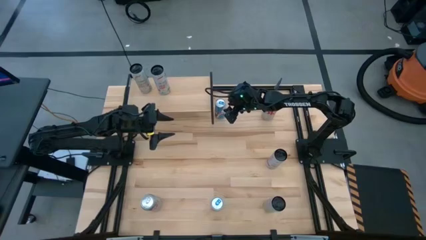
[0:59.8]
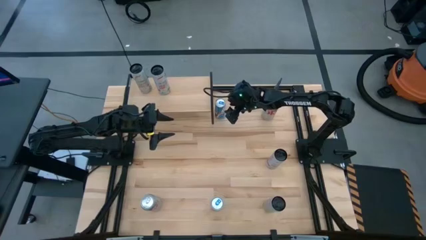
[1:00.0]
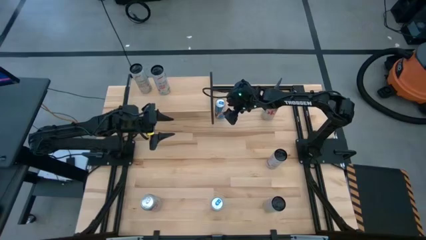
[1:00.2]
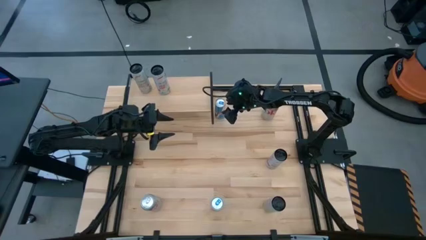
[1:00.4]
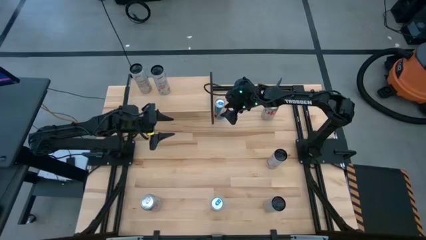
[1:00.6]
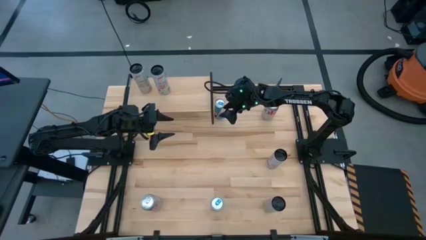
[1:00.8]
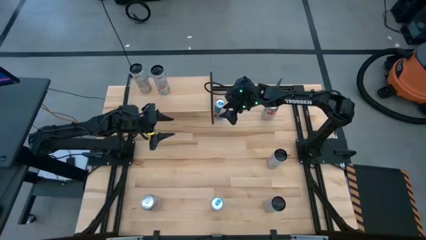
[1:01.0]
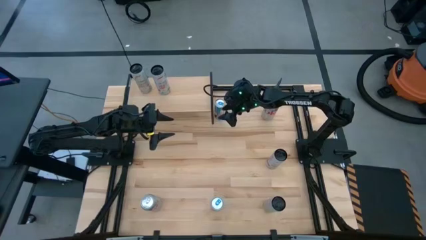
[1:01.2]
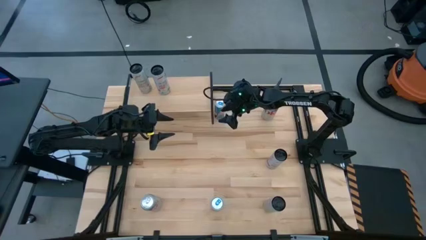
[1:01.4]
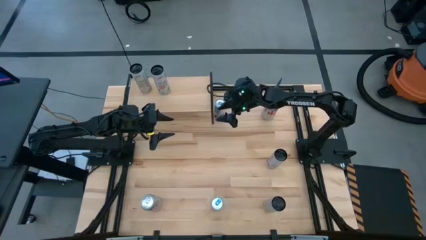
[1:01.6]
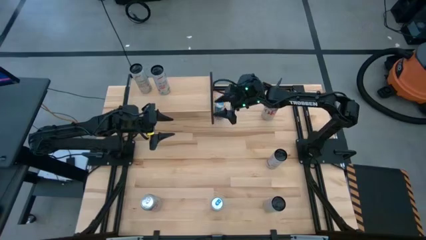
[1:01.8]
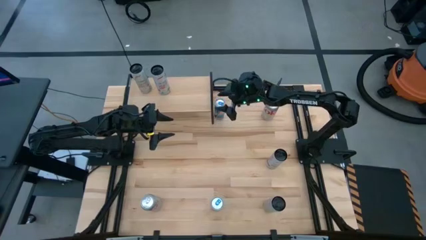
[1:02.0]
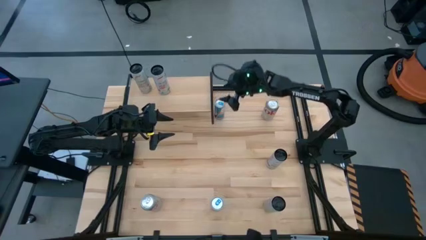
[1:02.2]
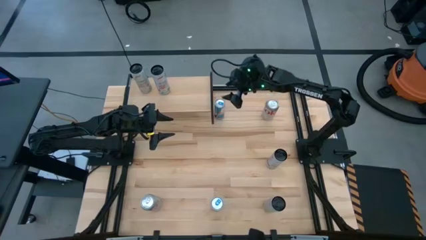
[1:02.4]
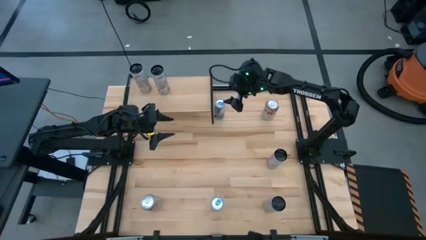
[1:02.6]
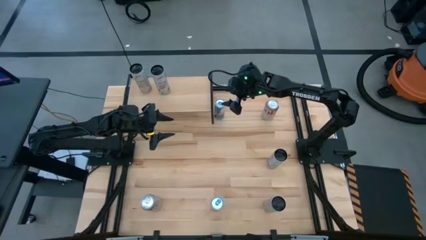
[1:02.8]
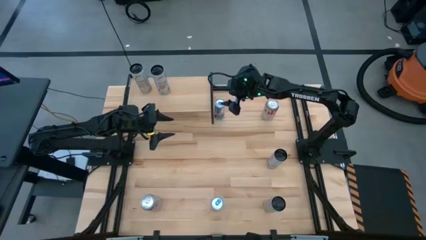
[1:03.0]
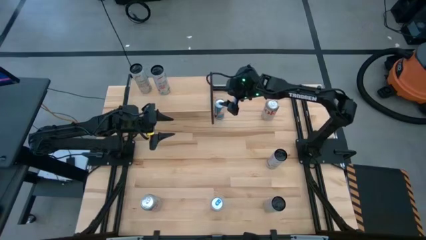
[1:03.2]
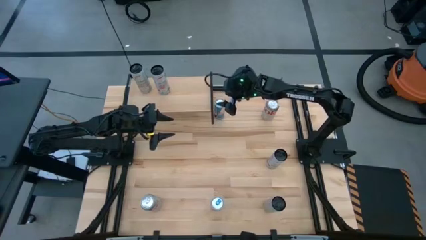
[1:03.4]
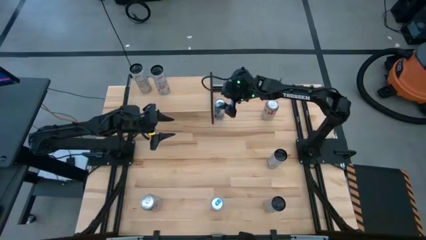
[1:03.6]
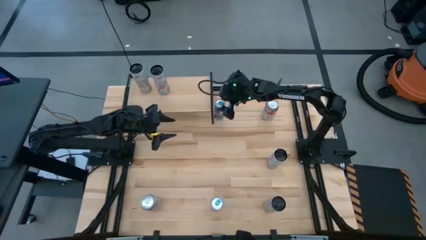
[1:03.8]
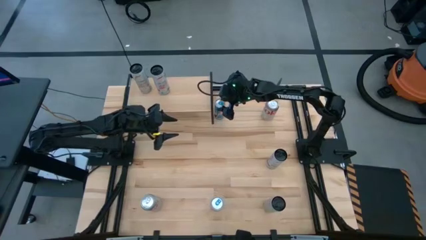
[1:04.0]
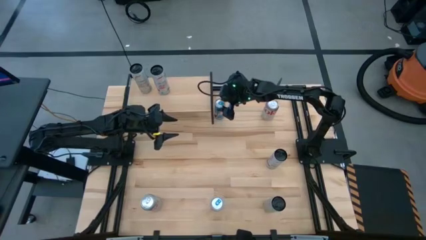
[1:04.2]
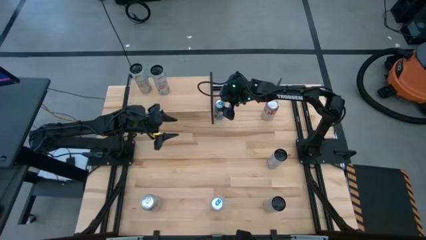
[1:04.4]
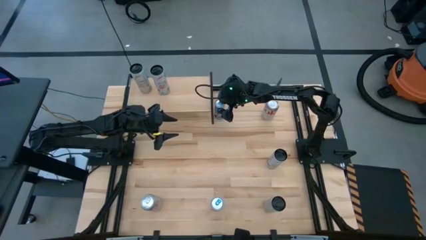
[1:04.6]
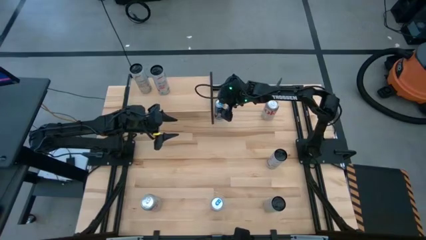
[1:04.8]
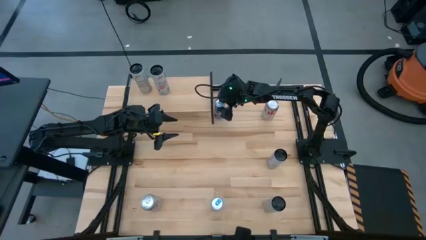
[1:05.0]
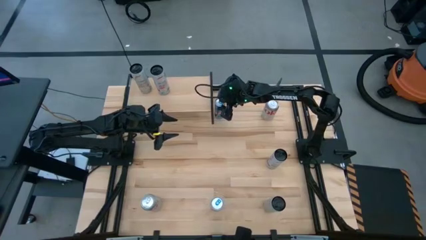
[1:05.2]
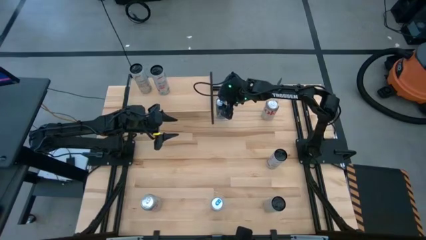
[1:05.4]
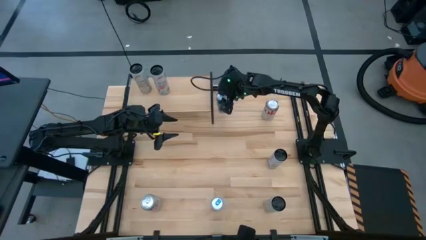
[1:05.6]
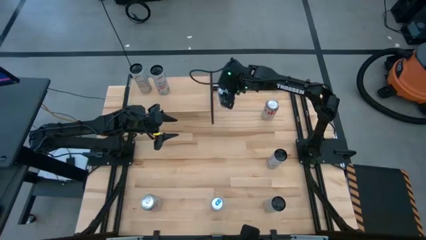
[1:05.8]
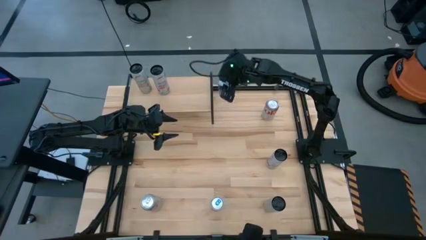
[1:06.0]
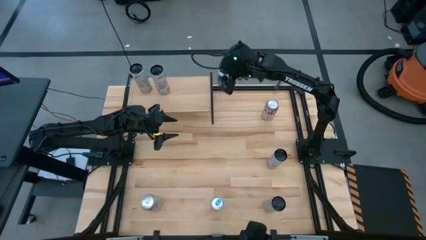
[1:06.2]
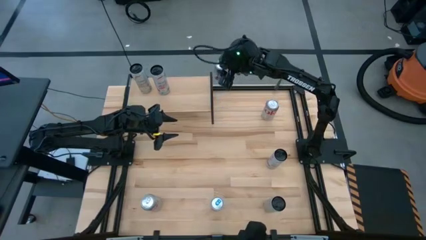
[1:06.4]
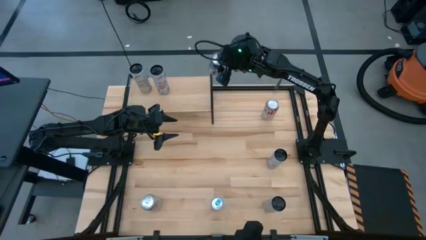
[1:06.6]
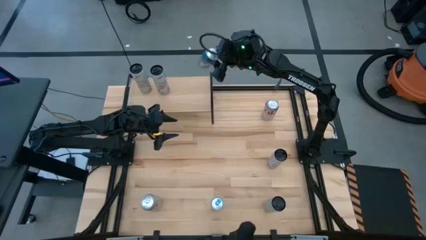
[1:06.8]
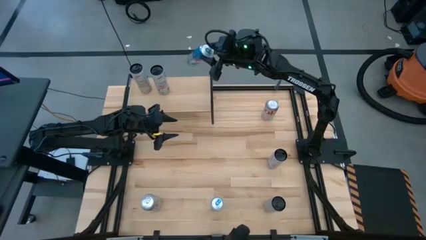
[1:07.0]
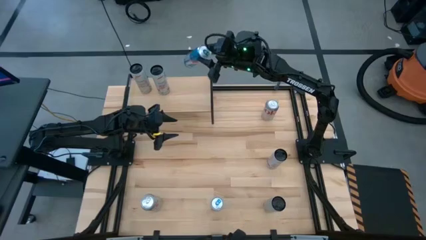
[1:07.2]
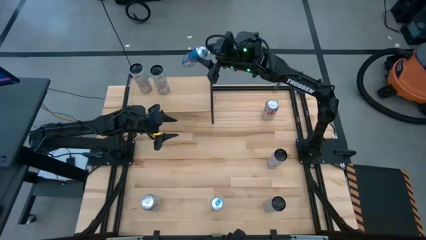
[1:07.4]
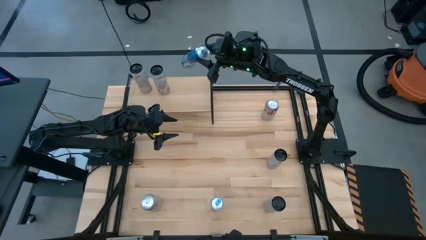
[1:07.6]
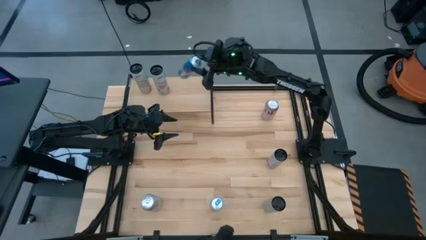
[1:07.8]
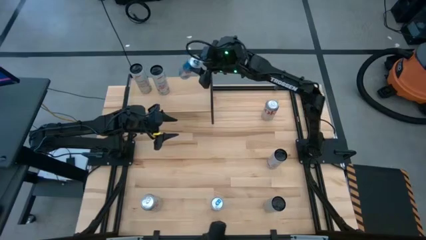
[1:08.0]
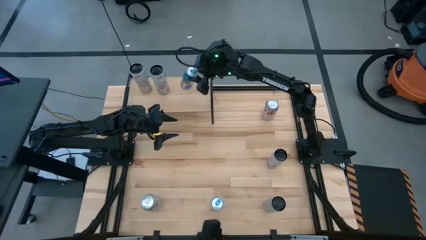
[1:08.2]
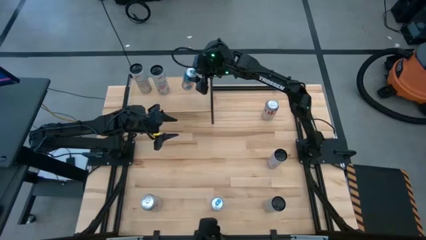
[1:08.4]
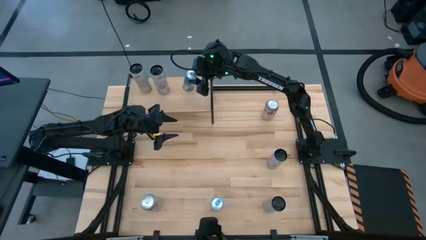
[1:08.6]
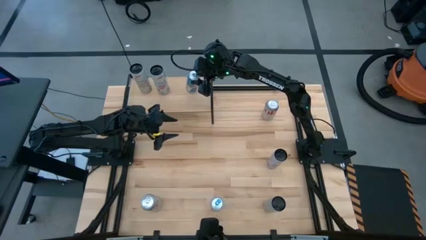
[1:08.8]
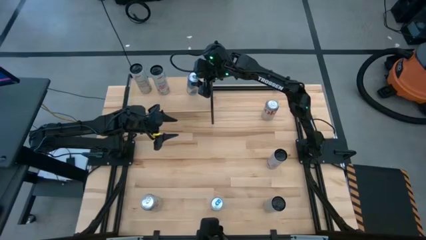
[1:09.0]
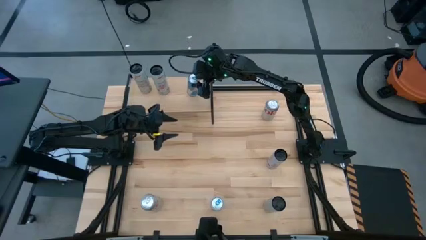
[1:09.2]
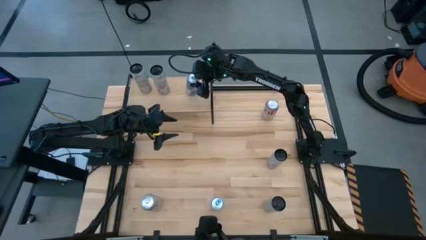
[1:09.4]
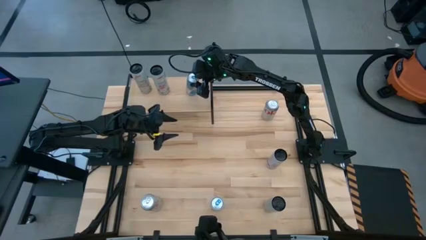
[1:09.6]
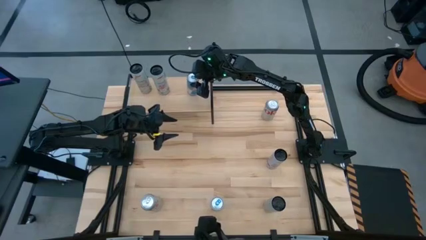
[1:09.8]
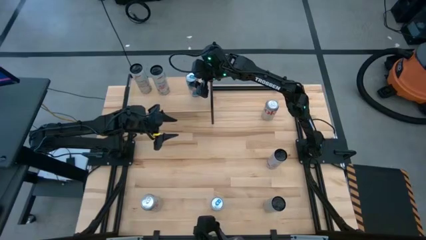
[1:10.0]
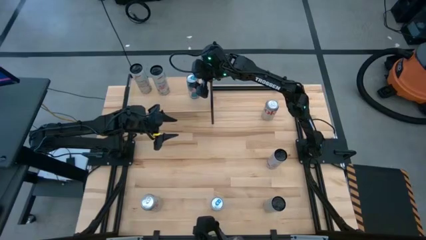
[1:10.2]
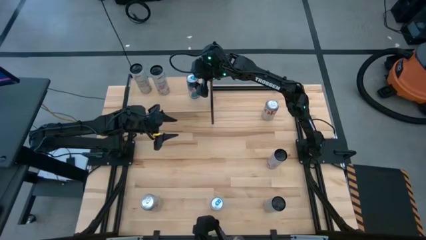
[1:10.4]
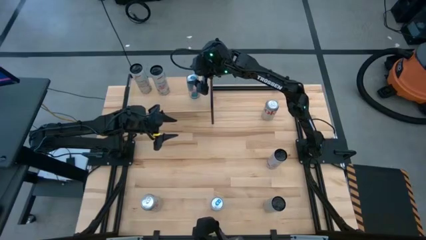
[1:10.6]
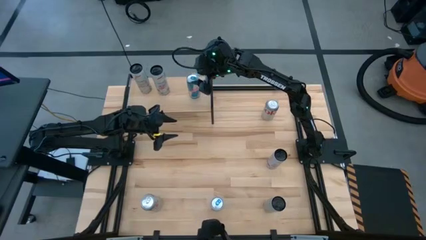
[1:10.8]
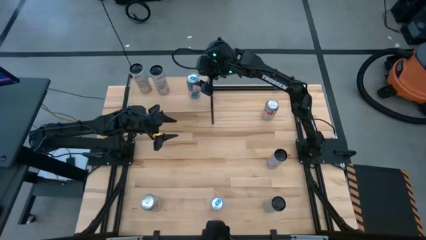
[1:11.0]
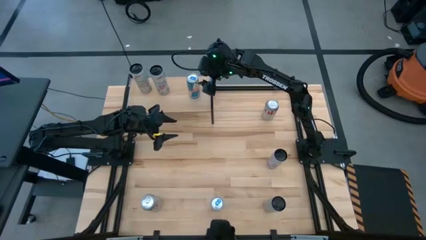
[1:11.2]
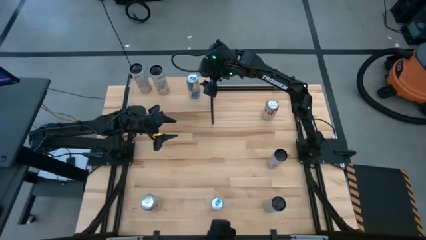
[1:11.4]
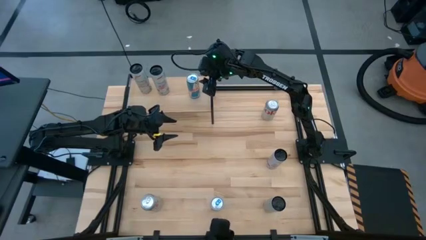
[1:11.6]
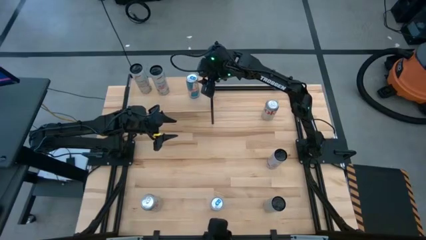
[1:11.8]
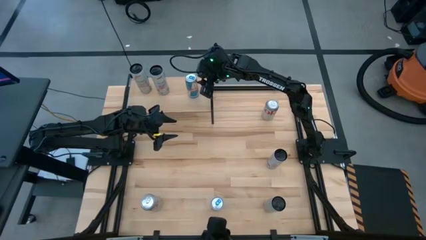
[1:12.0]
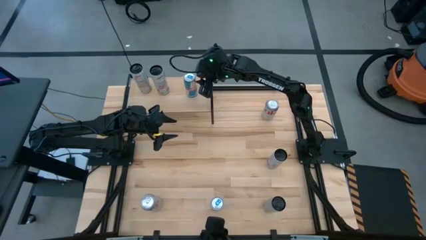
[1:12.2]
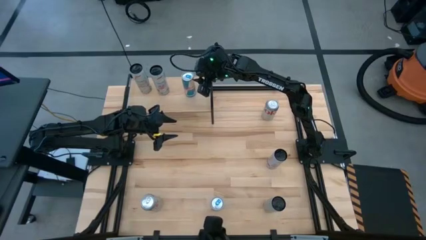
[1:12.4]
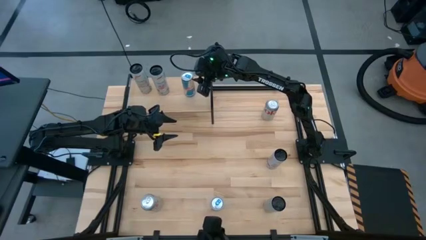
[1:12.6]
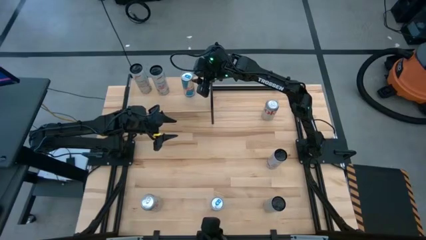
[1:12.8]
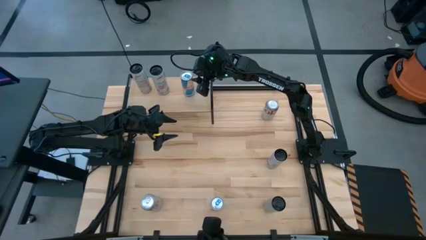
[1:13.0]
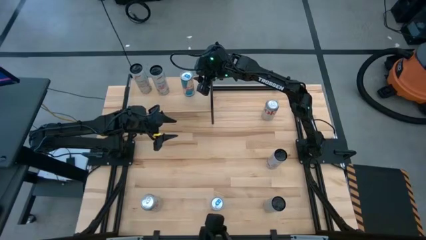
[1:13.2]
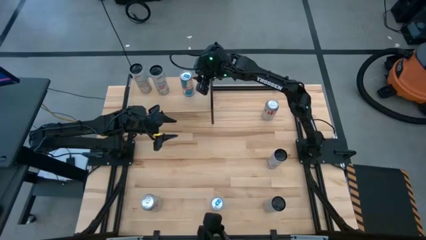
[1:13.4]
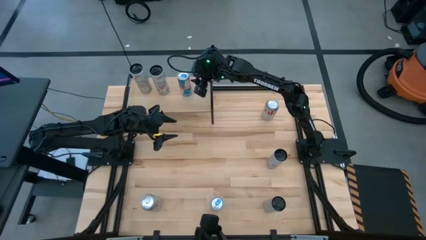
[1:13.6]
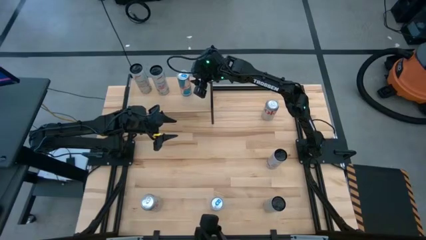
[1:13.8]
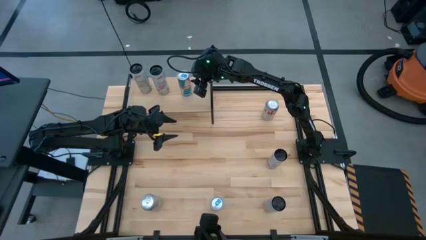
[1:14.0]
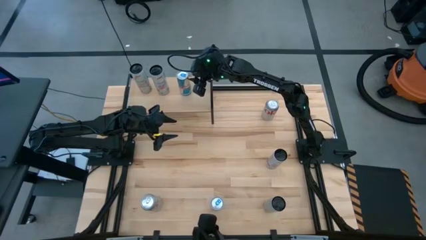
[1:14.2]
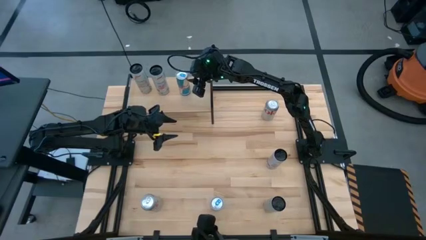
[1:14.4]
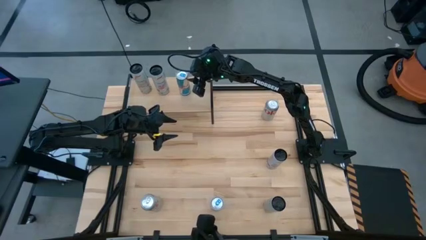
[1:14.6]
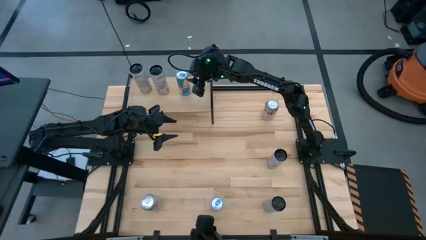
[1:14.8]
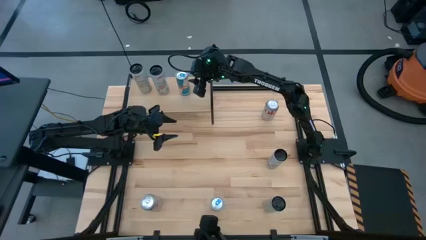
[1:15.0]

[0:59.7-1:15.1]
Task: Place canned beverage on shelf
Put the top blue soda can on the shelf
